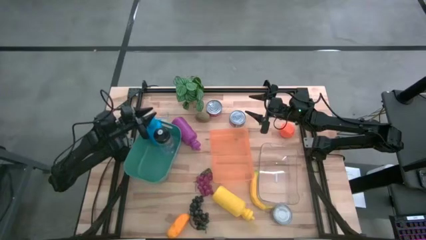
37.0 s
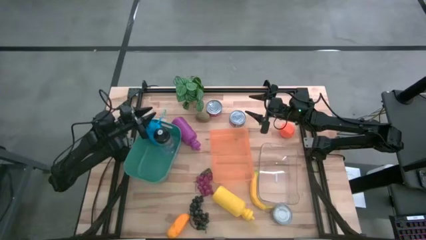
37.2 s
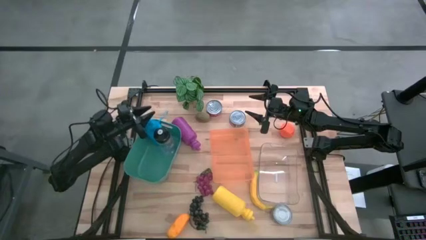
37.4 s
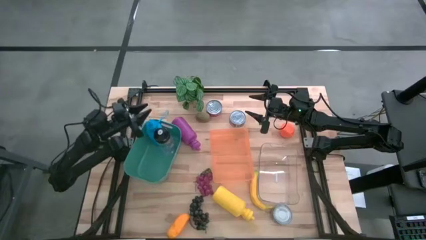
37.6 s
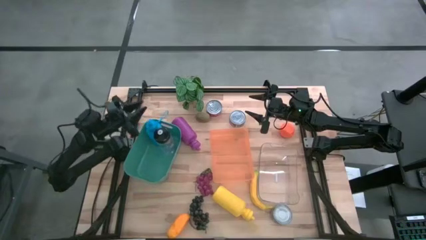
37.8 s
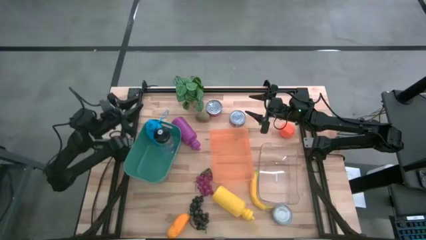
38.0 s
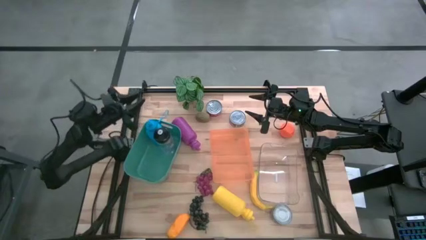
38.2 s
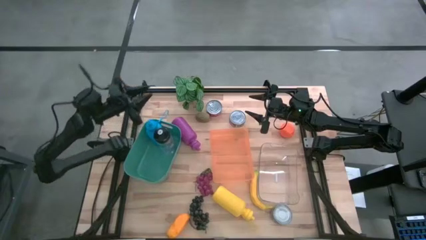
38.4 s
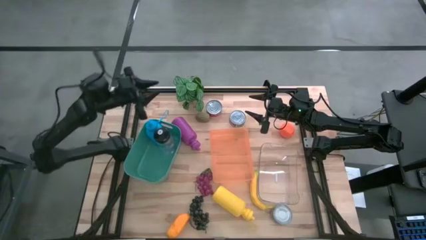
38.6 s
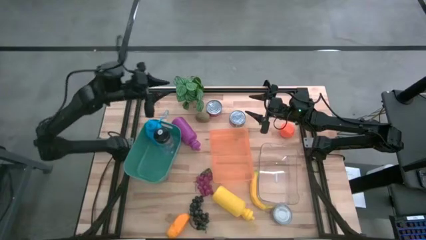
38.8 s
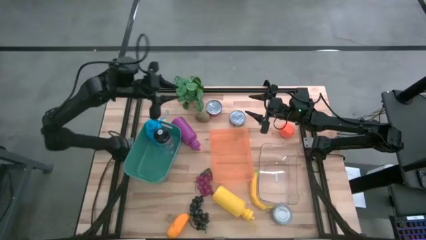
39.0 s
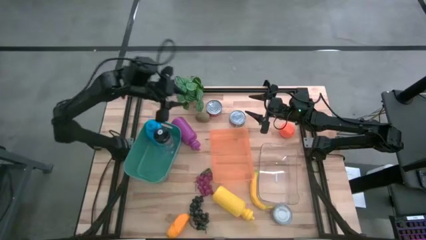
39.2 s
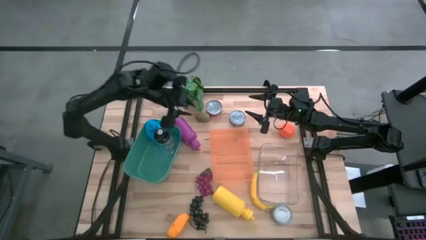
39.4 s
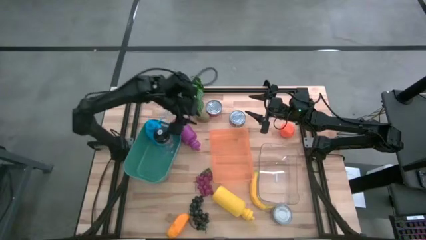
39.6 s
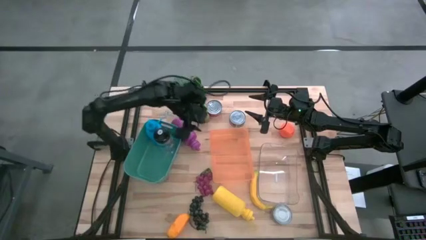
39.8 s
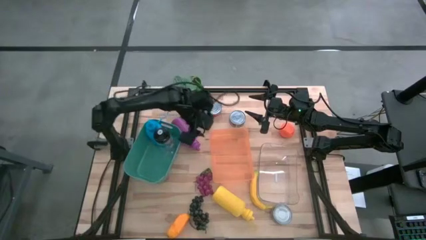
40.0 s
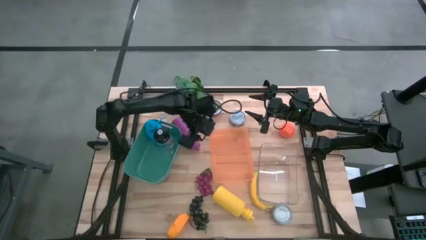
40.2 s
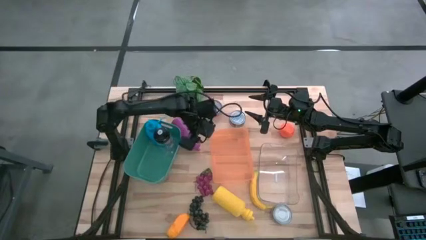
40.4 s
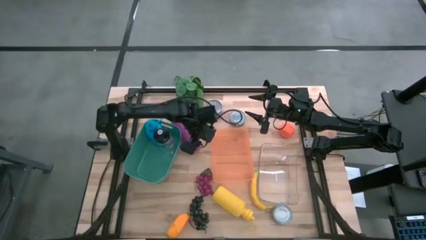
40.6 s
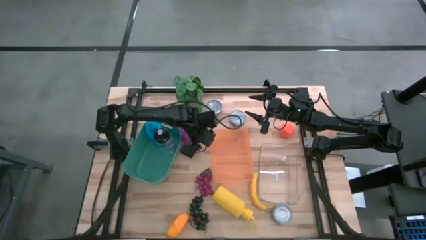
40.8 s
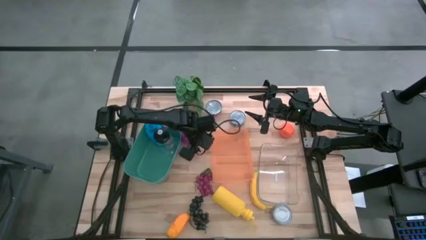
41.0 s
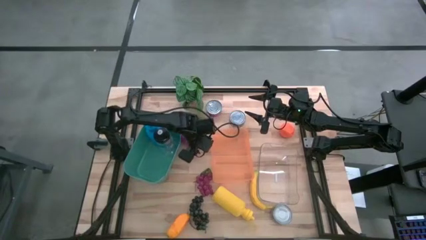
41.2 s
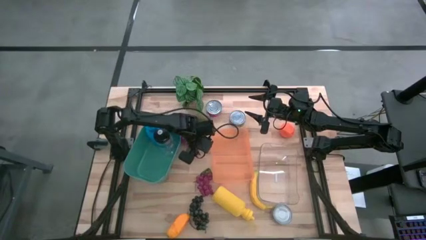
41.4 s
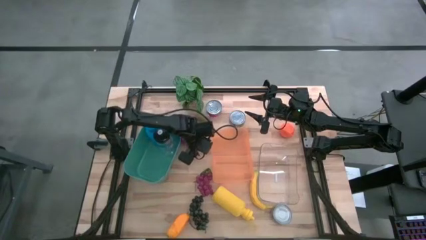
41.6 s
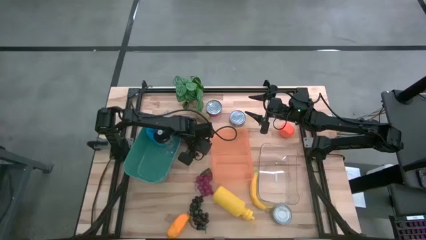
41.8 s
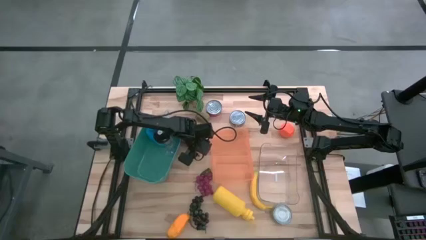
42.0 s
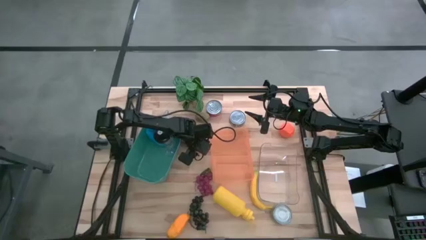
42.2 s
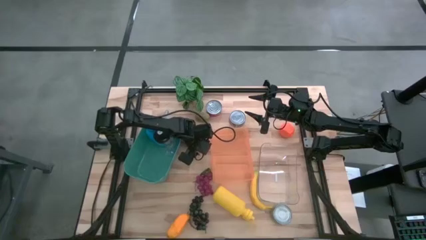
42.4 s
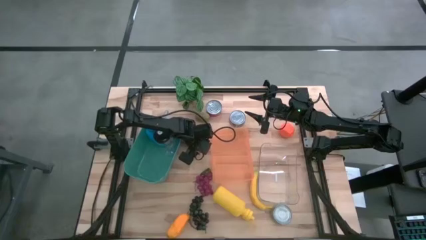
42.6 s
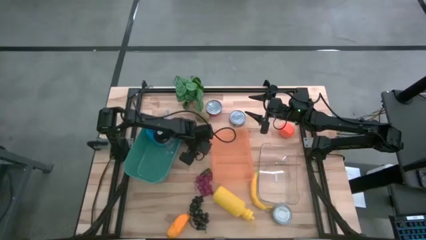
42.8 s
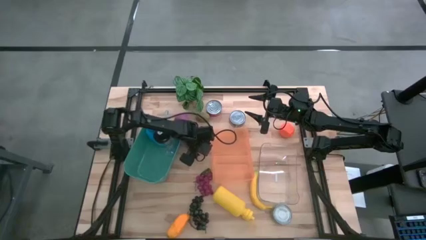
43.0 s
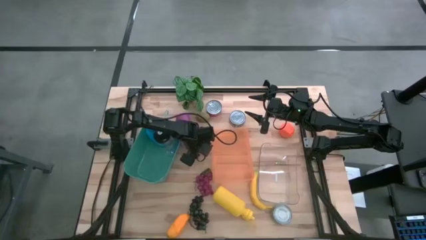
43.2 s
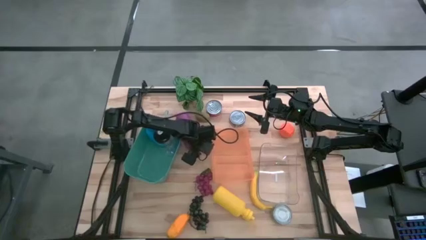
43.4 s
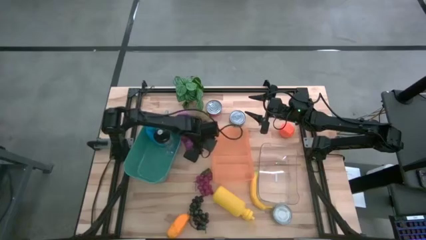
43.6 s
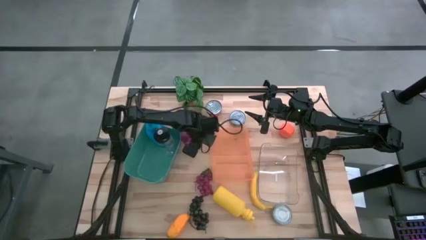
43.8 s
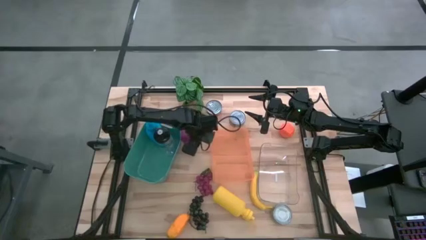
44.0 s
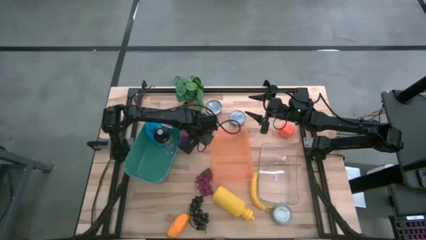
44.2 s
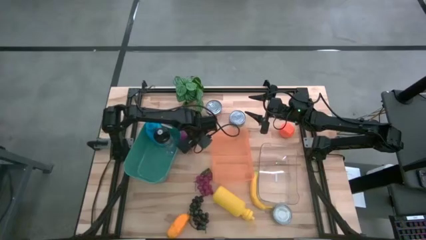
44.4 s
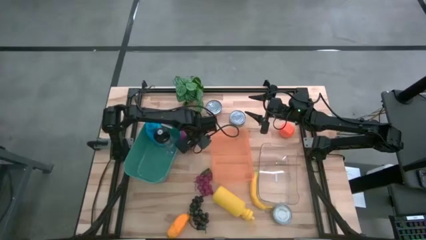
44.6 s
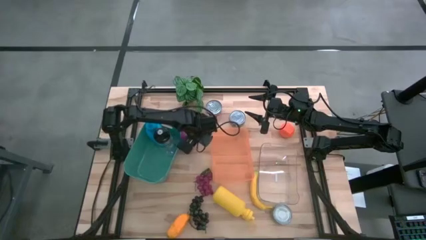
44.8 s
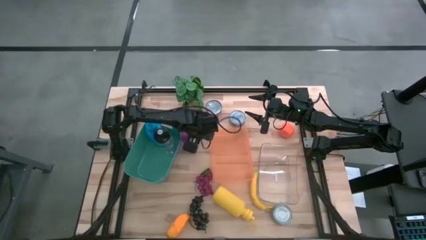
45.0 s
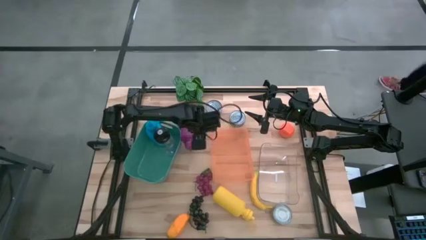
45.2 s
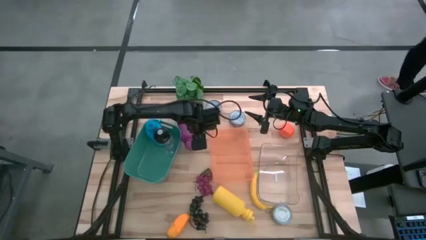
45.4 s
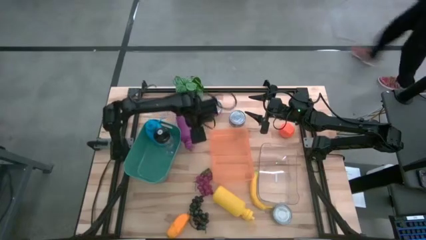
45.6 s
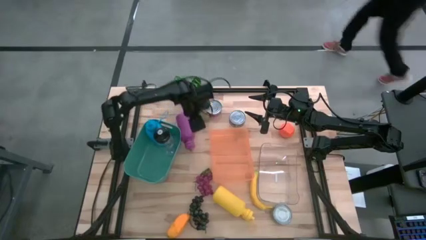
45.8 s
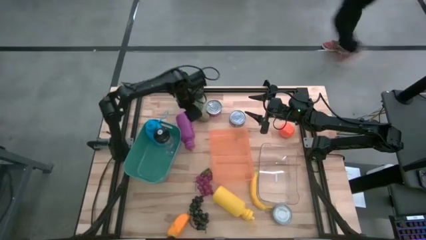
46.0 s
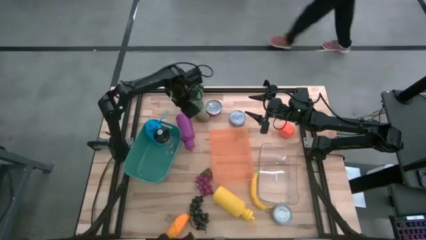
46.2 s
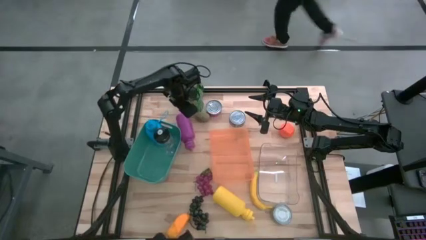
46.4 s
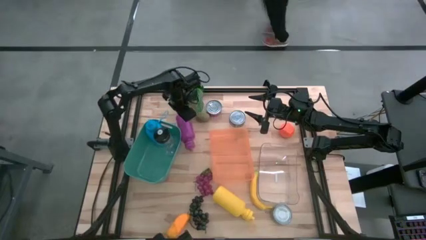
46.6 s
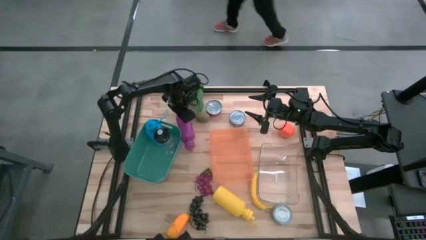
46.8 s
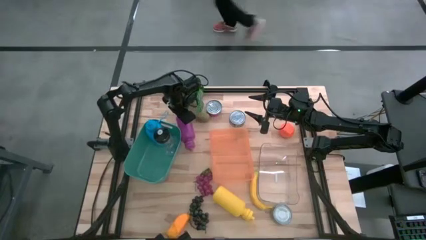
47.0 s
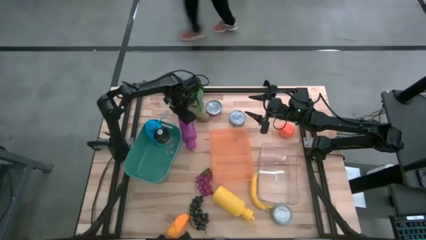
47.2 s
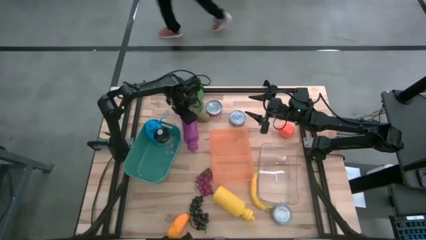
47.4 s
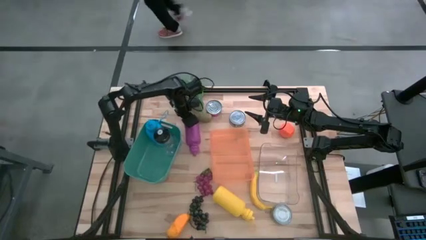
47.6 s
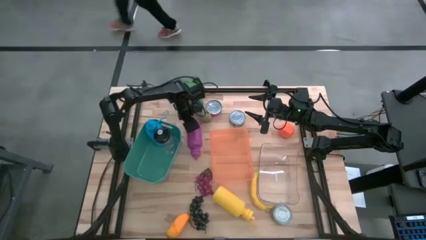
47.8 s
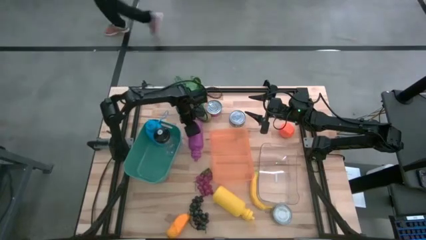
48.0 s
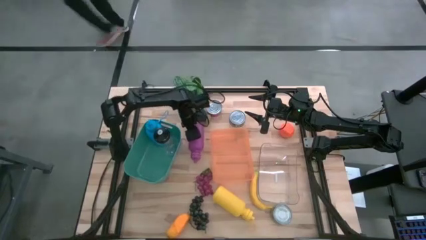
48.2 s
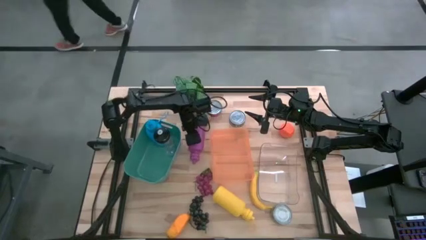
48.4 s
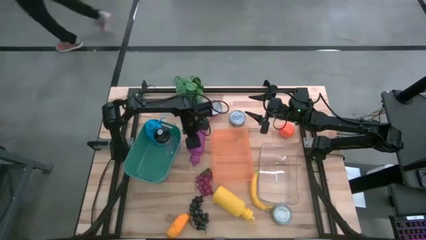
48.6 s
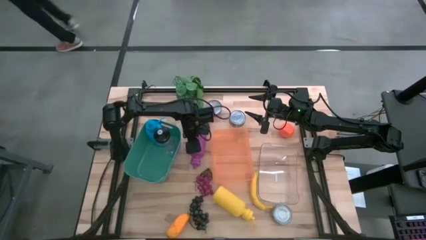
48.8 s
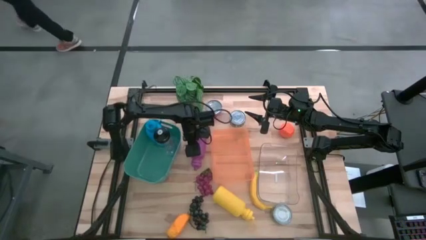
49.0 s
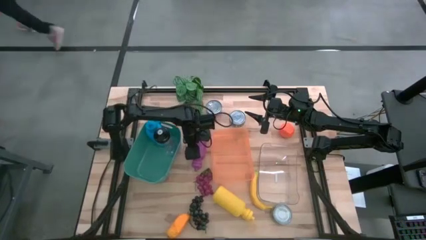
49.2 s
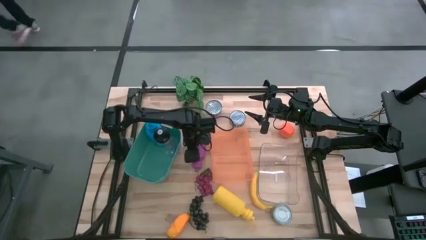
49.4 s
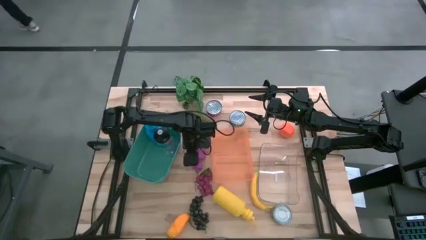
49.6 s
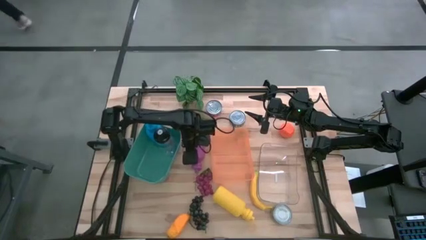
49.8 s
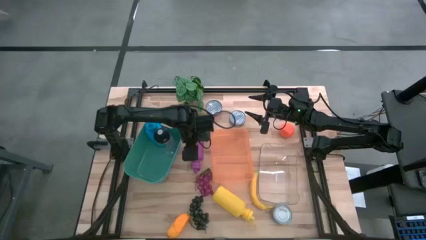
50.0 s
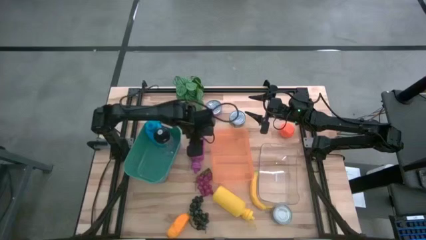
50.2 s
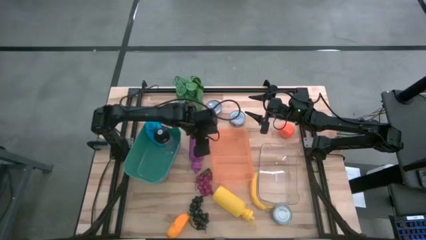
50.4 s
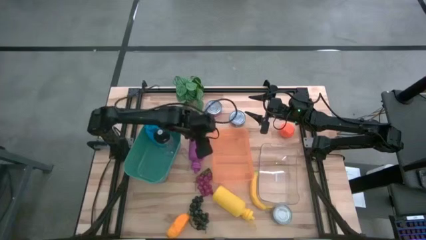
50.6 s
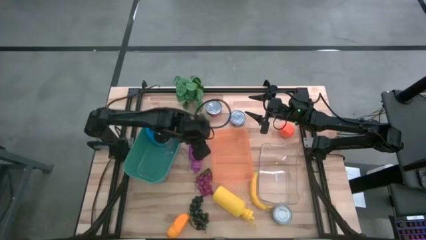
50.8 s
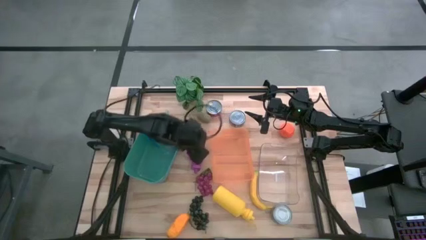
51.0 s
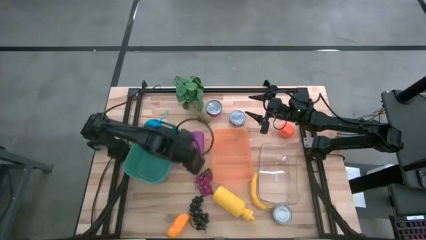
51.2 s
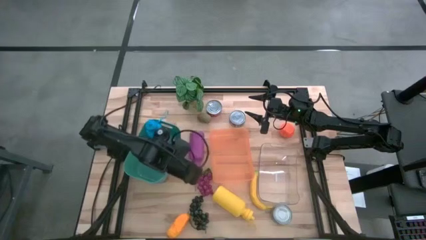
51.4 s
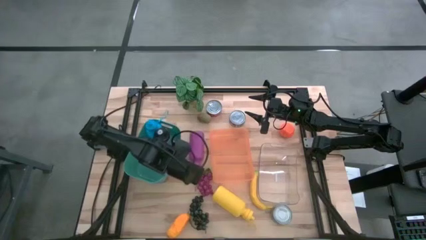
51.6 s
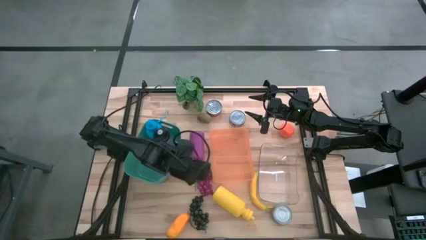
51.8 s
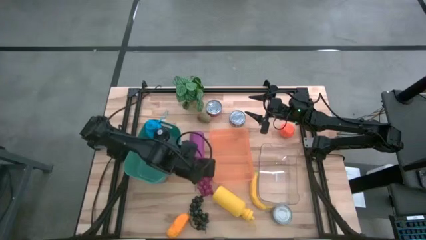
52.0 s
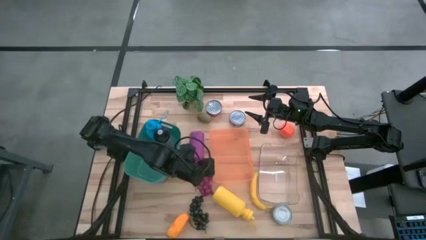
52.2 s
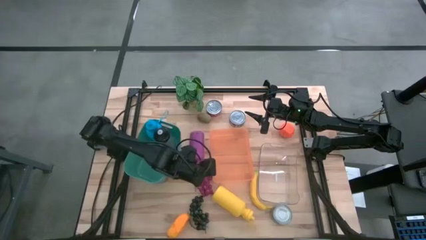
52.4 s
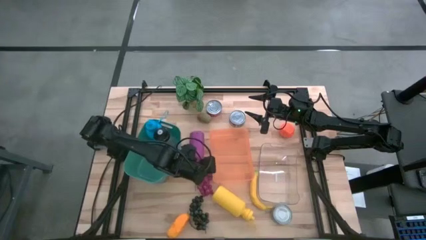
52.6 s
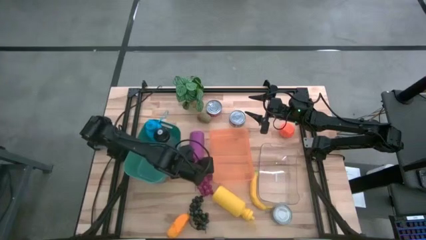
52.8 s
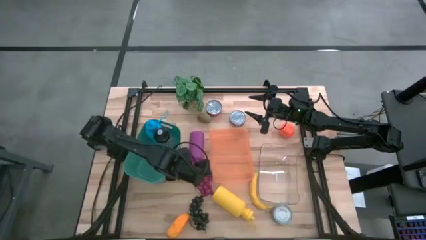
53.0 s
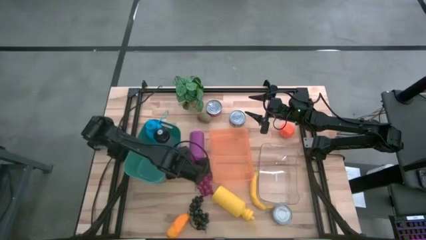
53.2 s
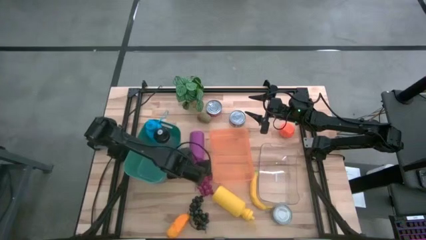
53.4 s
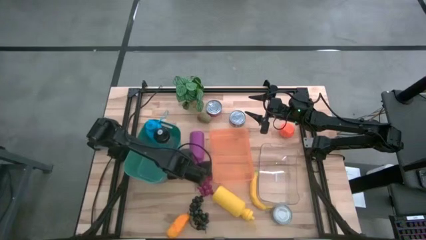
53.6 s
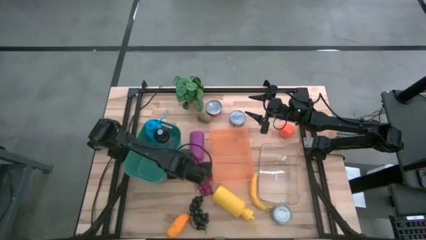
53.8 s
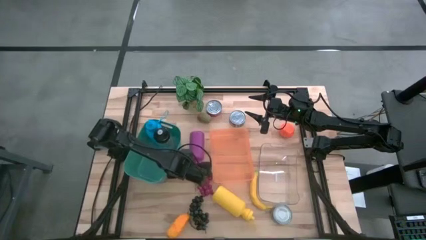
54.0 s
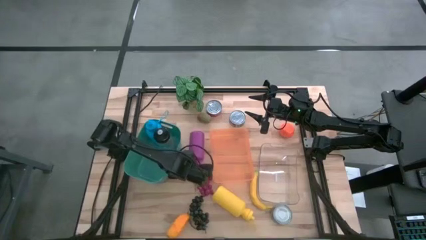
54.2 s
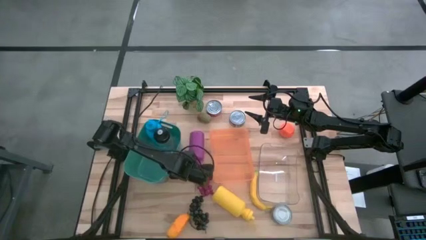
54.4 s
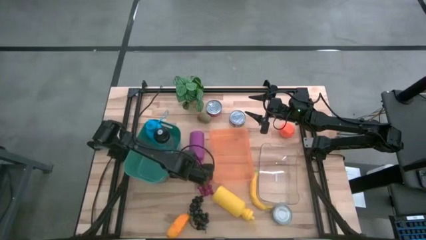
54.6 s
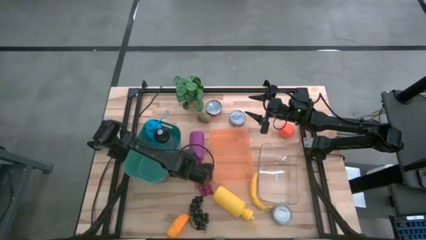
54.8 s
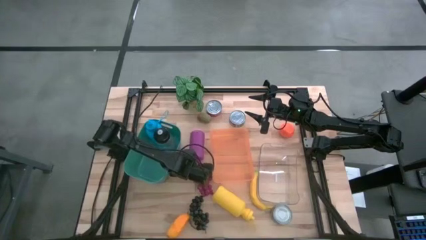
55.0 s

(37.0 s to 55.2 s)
Task: Pick & Place Food Item
Put the violet water bottle into the green bin
